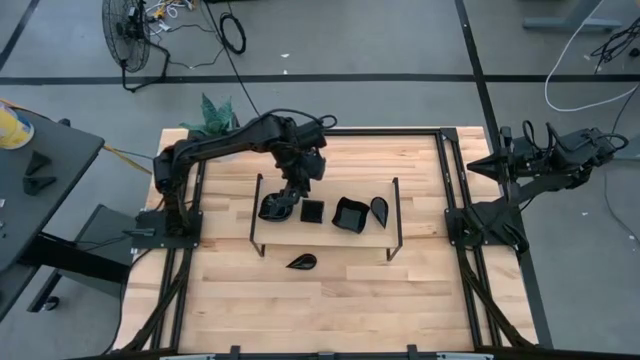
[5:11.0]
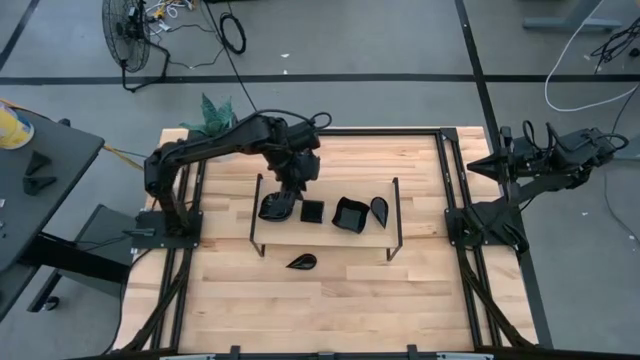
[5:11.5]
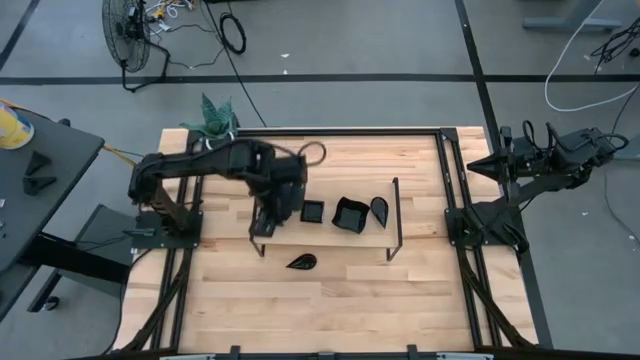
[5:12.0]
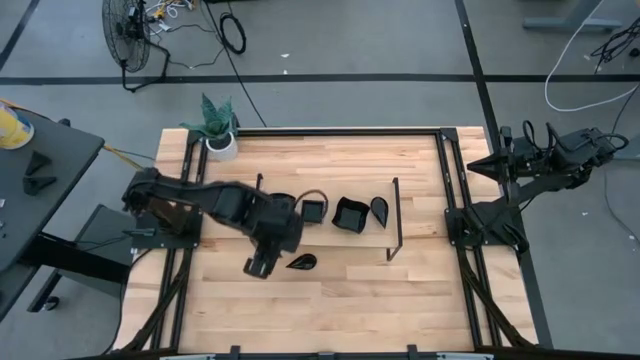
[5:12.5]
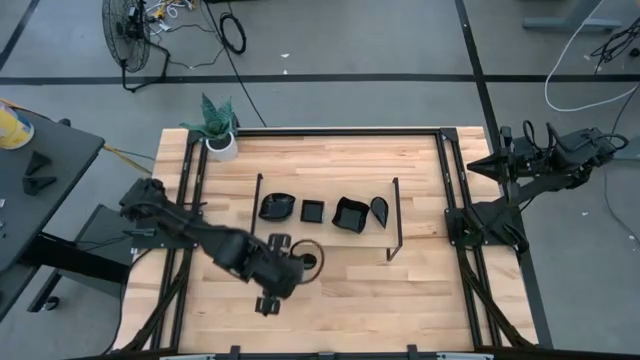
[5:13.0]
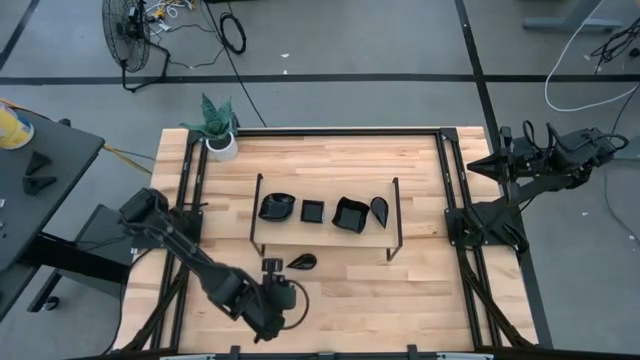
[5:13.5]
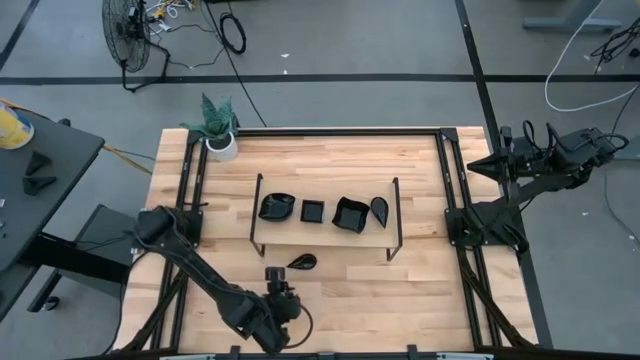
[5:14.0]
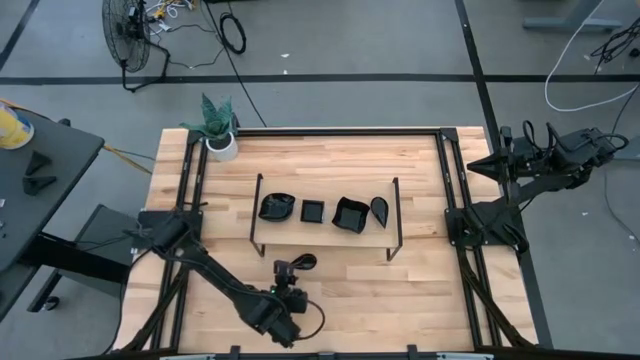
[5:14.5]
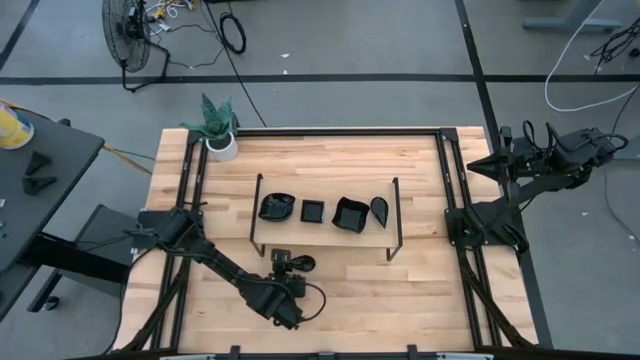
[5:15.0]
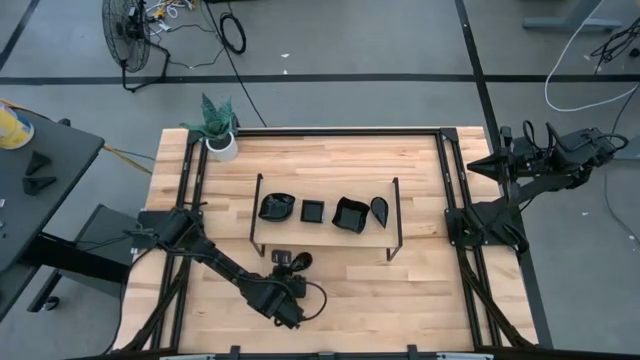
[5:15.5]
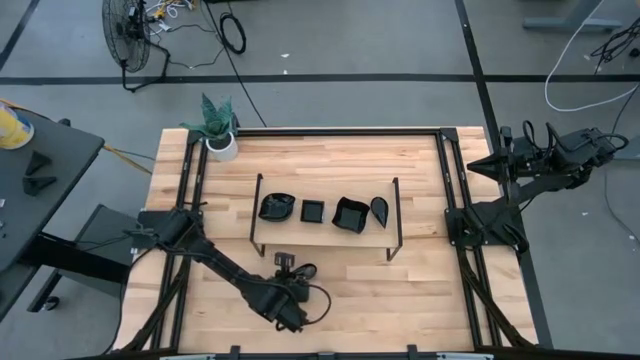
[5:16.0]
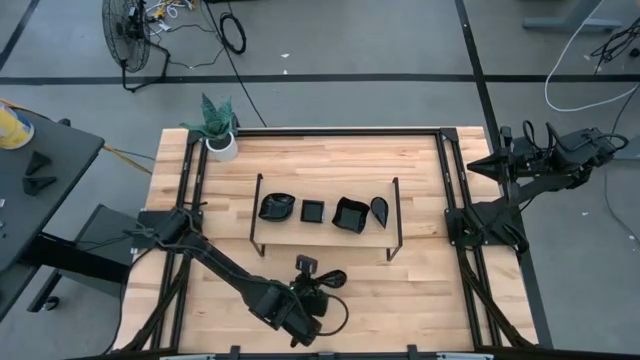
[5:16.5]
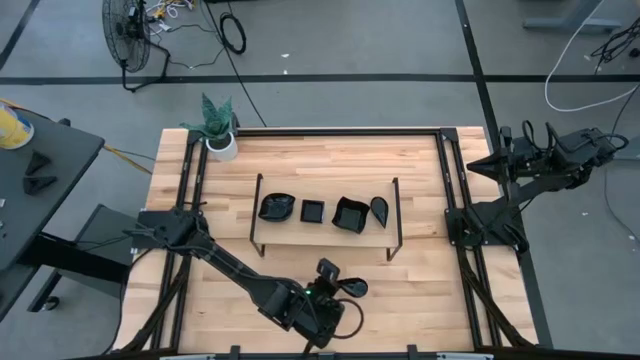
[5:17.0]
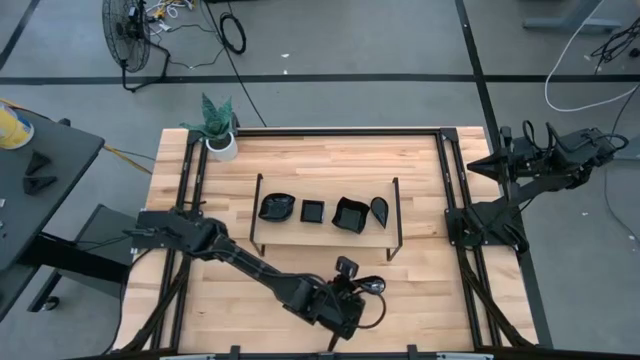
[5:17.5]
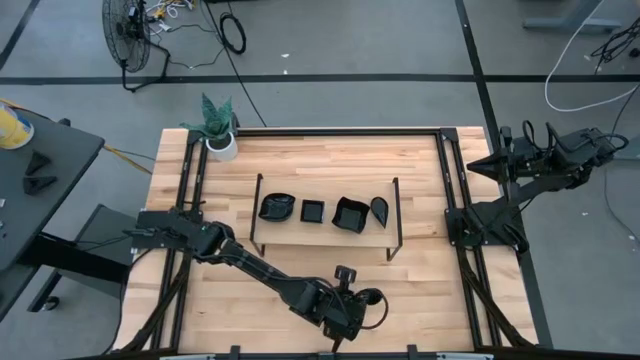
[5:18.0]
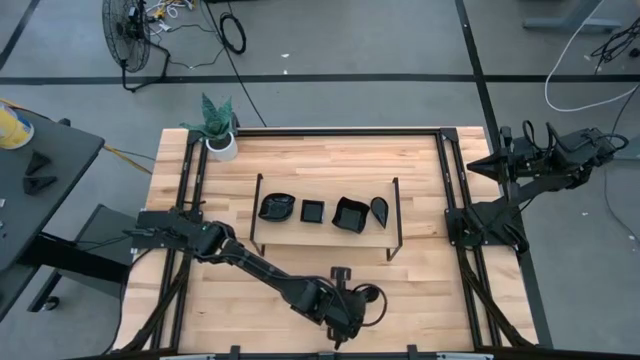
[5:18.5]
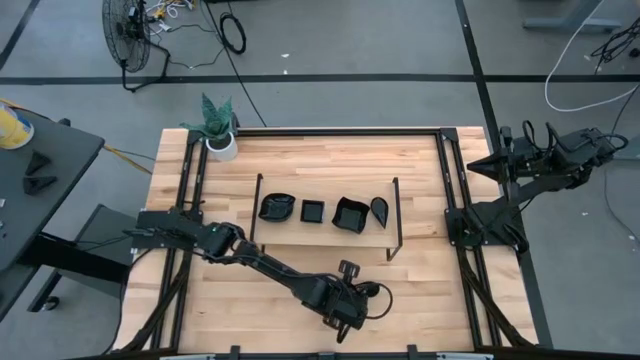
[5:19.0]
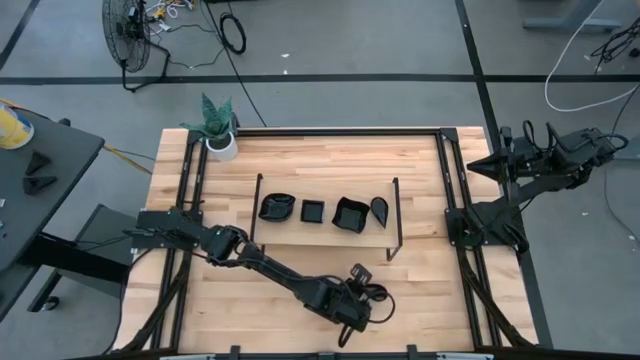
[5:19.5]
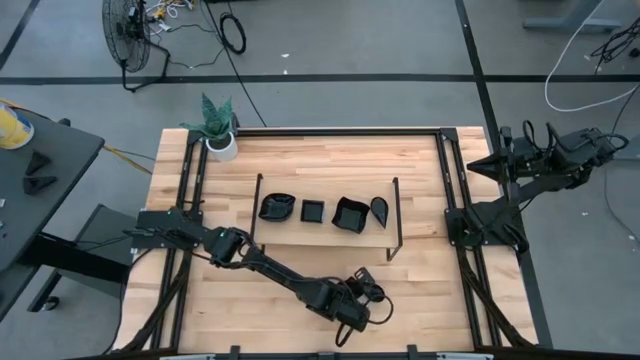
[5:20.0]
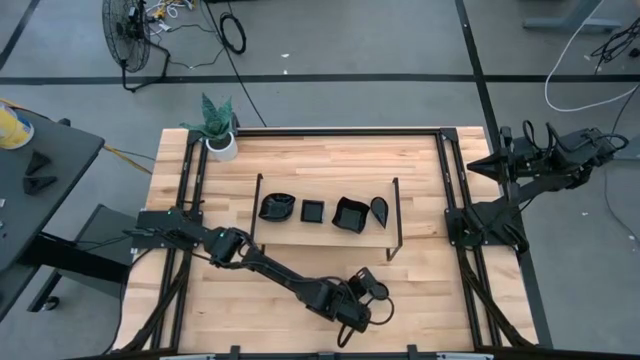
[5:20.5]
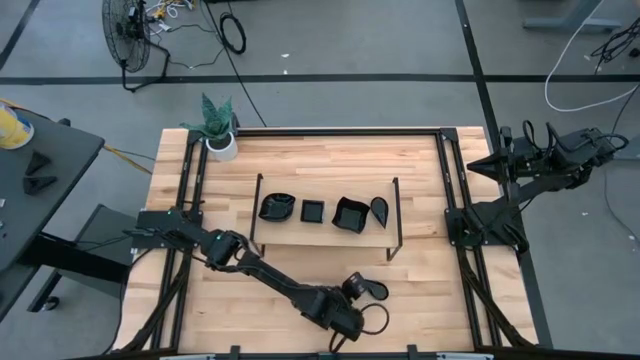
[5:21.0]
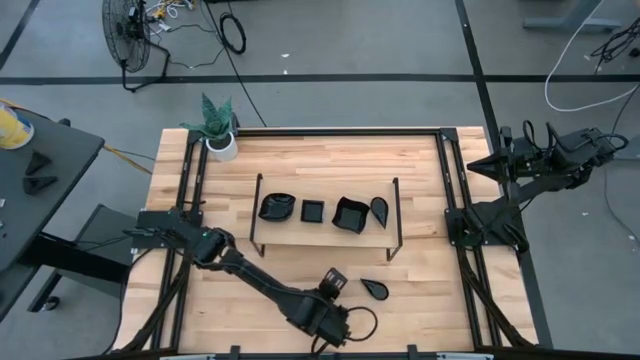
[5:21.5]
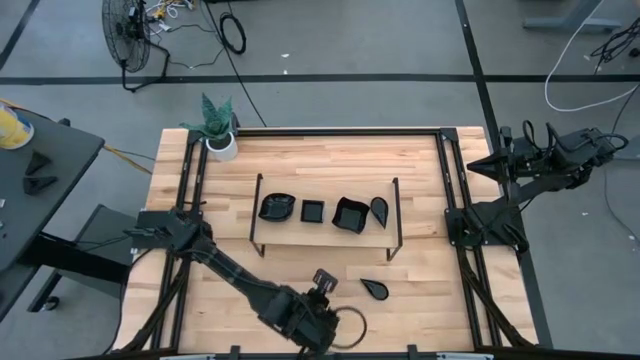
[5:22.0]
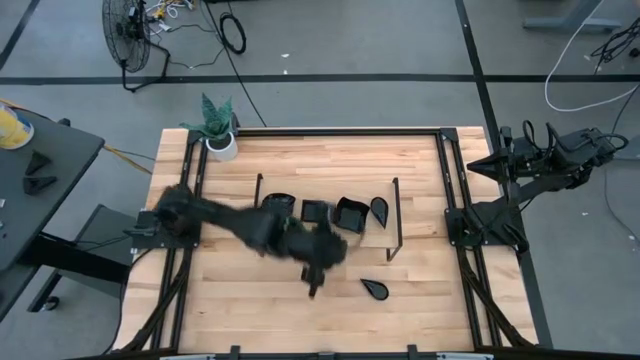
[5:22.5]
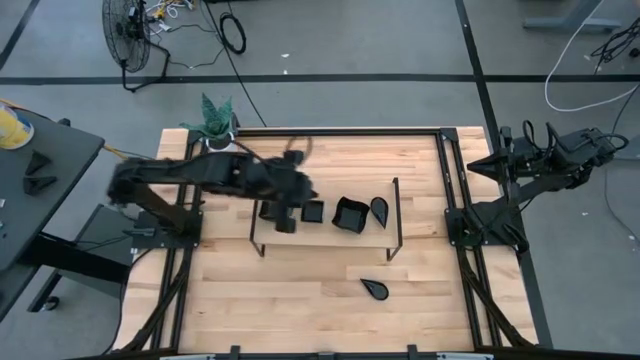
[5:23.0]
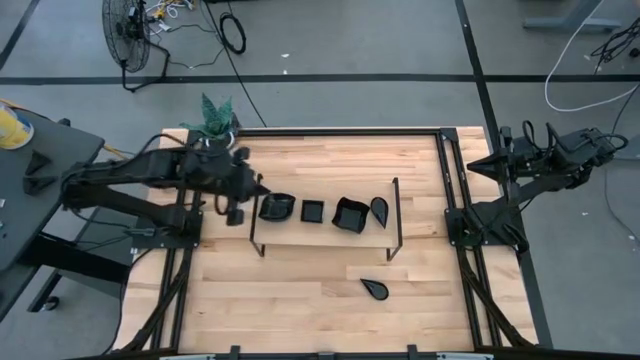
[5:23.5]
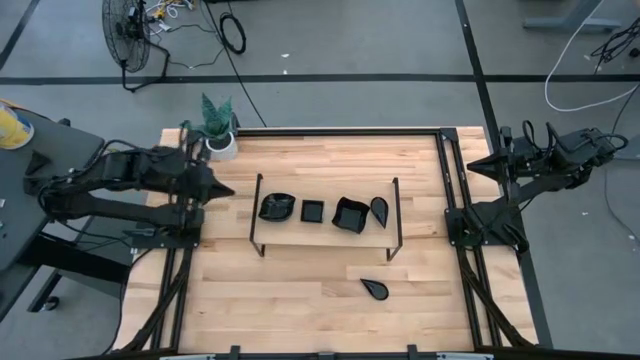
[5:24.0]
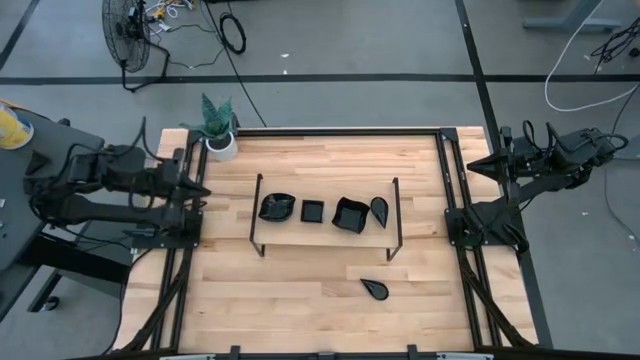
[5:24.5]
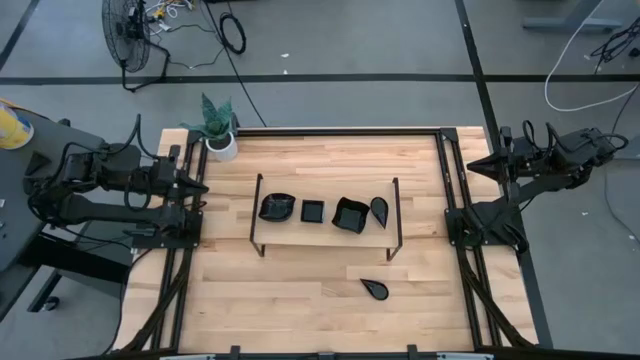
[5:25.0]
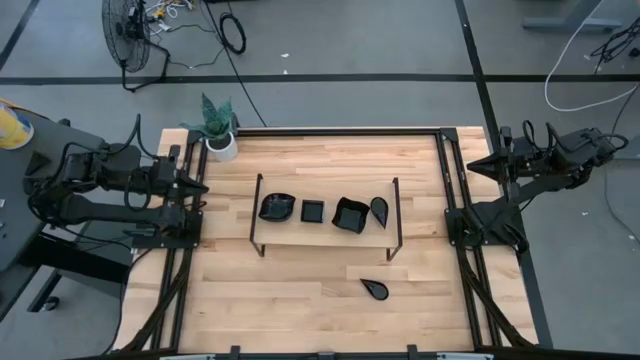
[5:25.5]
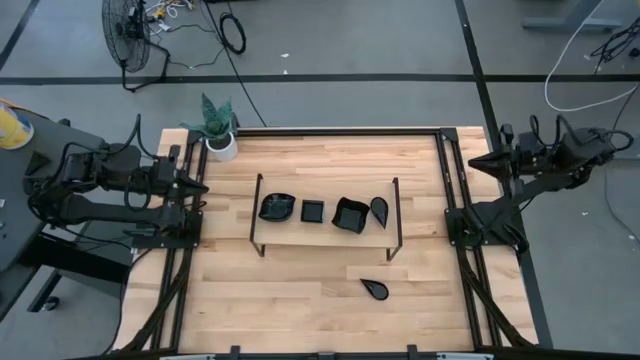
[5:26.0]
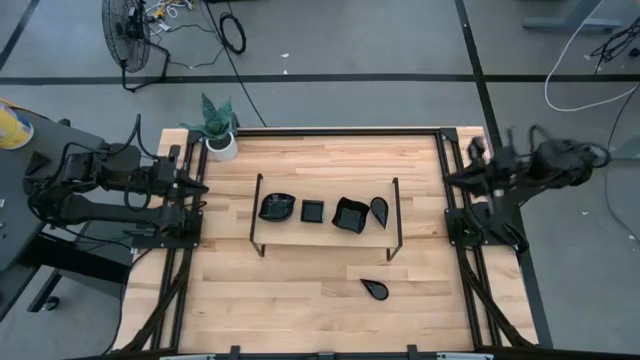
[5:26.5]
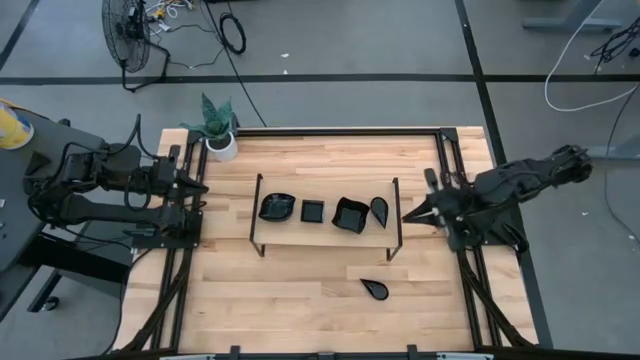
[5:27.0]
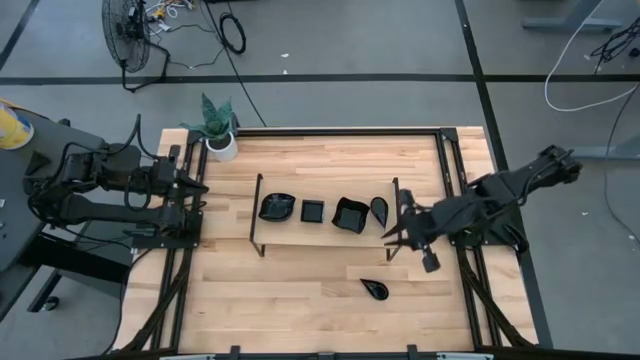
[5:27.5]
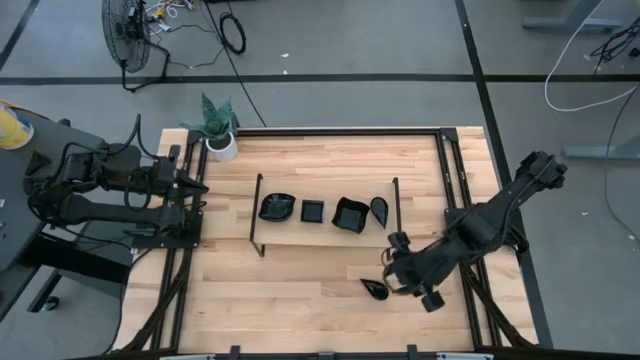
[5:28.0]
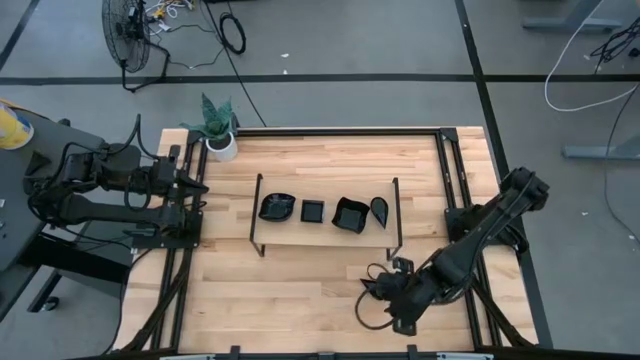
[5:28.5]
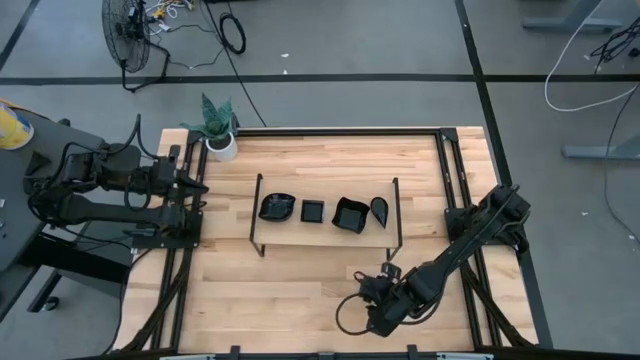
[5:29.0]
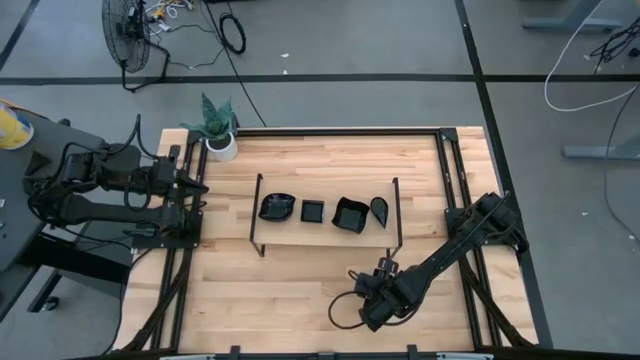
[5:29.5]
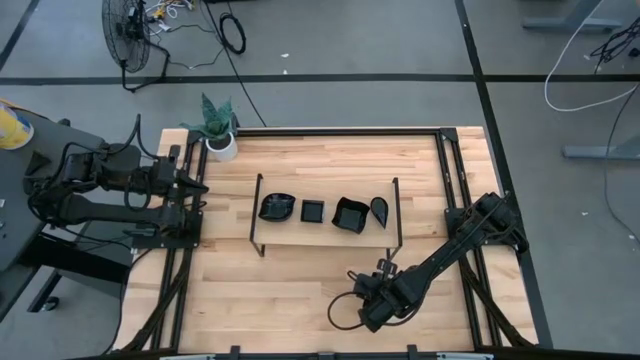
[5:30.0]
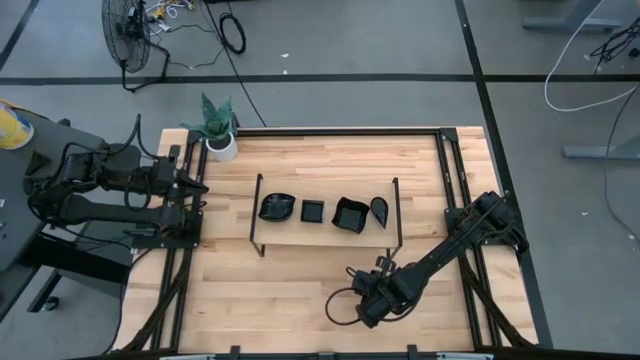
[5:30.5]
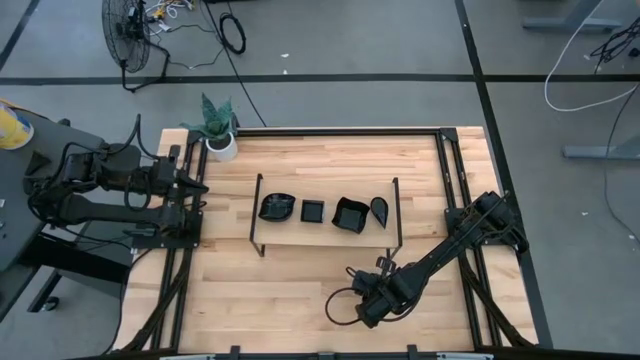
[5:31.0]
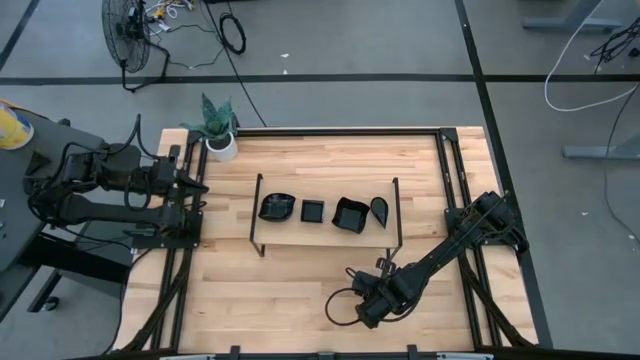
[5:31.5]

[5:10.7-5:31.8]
Task: Pick & Place Mini shaped plates
Stack the drop shaped plate on top of the drop shaped plate on the shelf

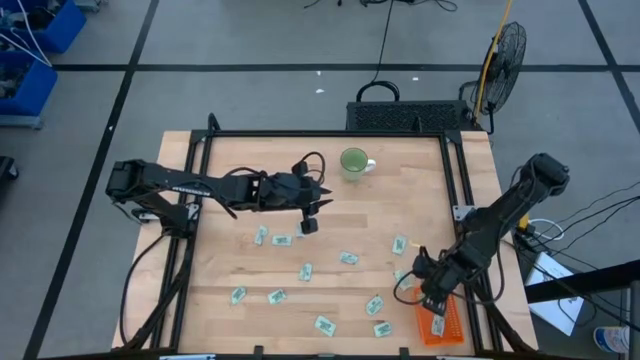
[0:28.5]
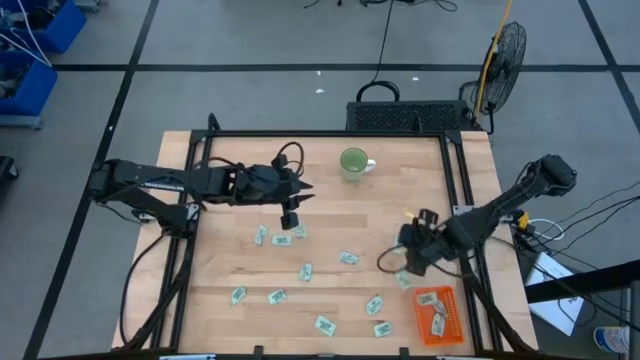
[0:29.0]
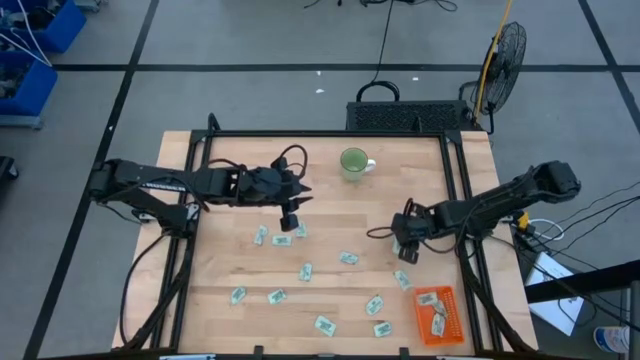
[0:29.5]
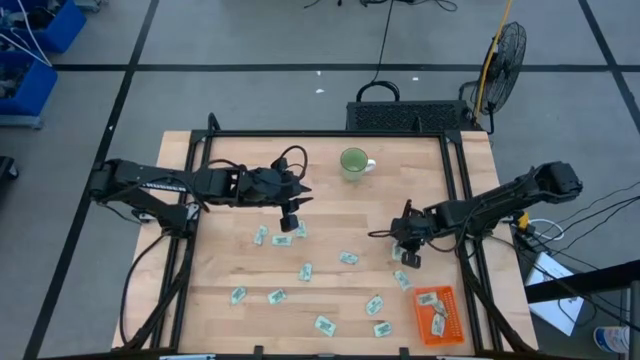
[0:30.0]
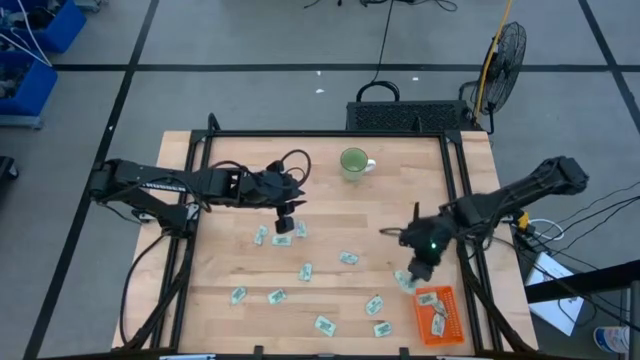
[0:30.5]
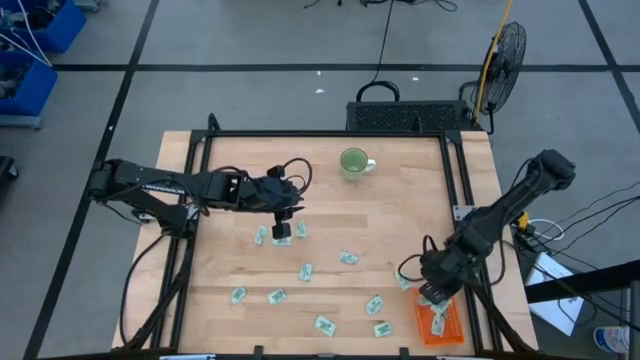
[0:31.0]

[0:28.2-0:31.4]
Task: Pick and place Stevia / Truvia into bins
Put the stevia packet into the orange bin
